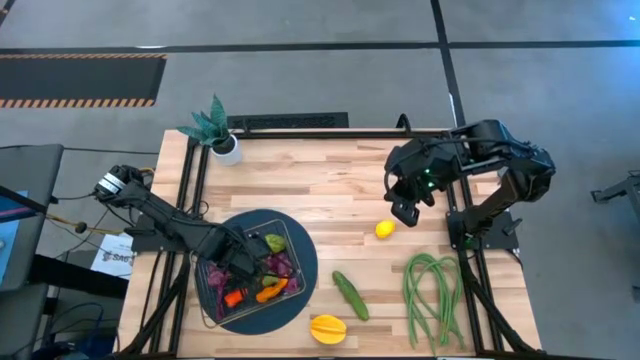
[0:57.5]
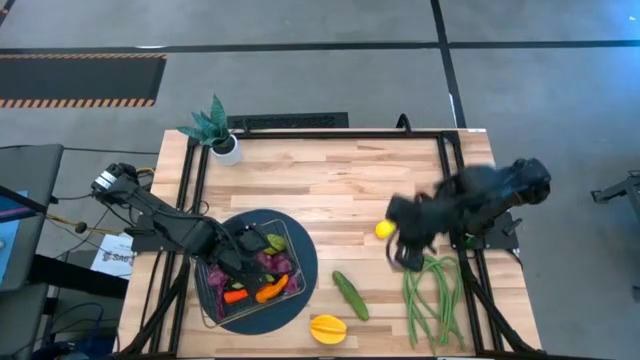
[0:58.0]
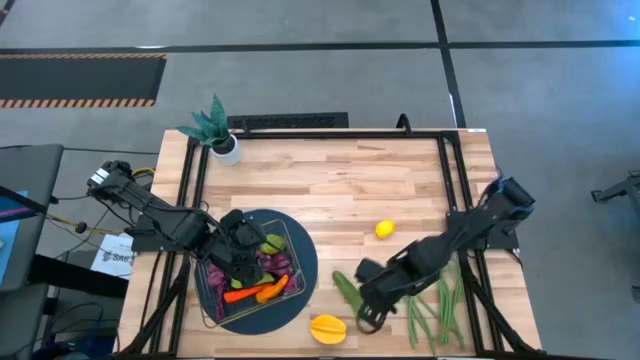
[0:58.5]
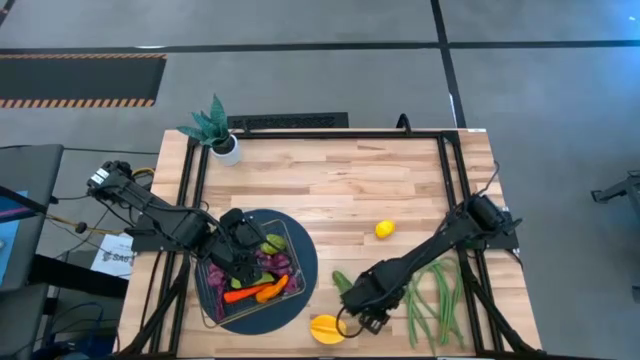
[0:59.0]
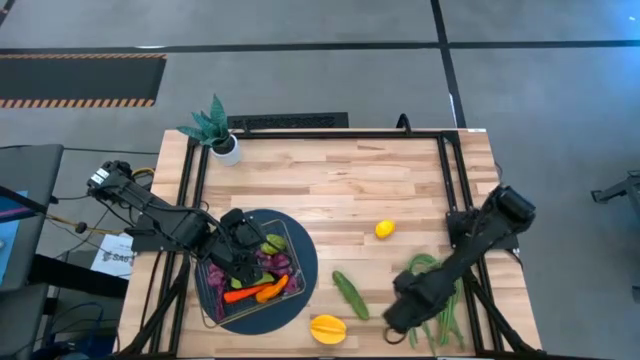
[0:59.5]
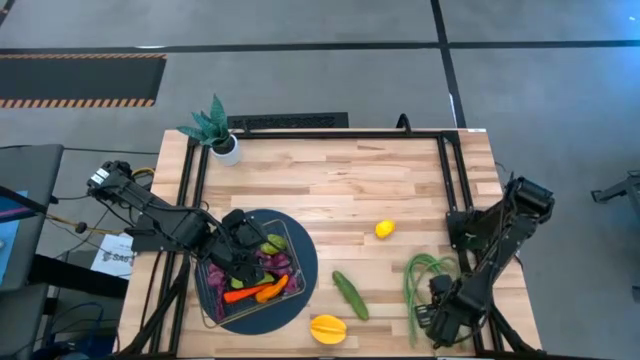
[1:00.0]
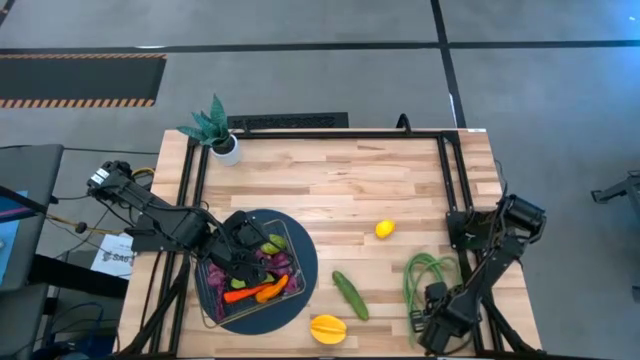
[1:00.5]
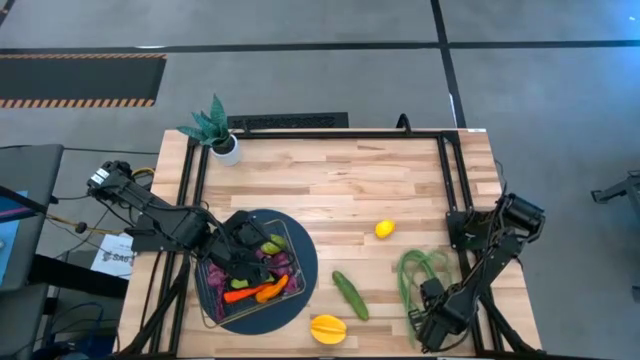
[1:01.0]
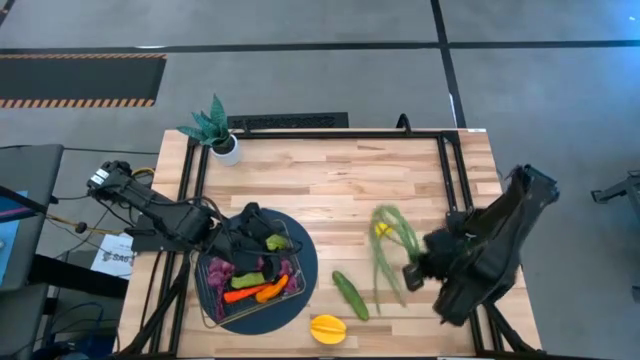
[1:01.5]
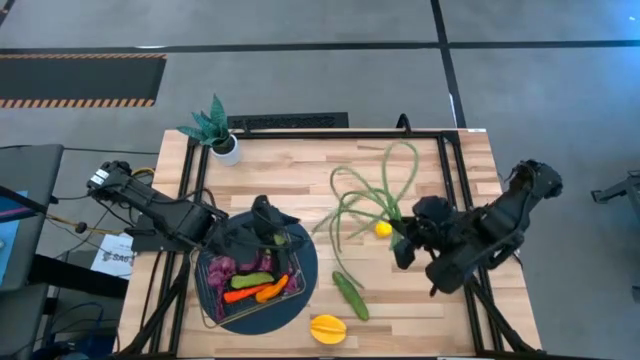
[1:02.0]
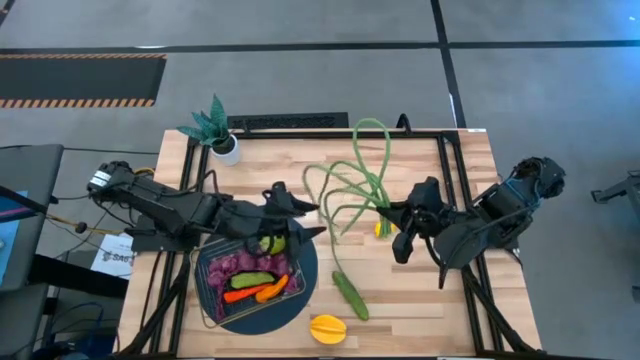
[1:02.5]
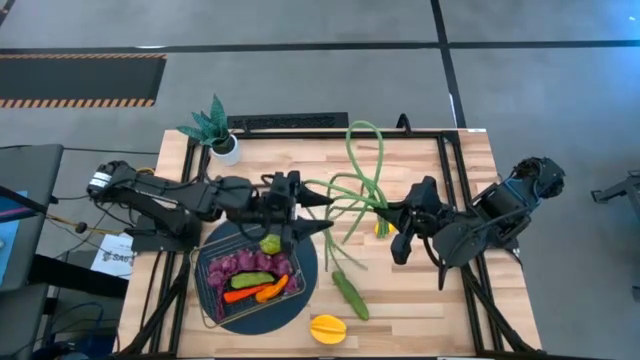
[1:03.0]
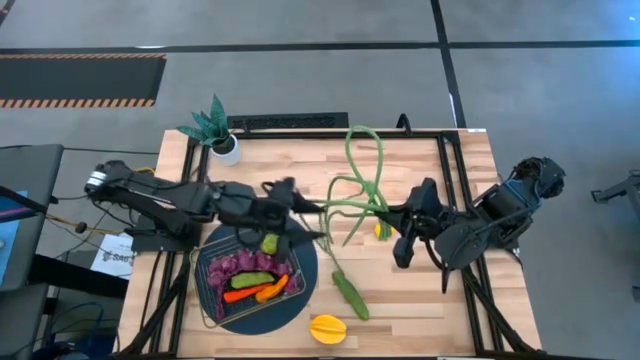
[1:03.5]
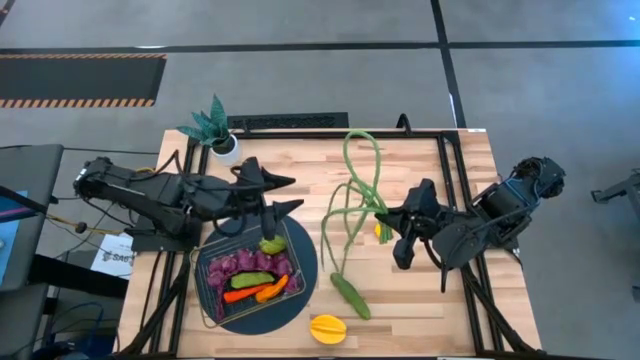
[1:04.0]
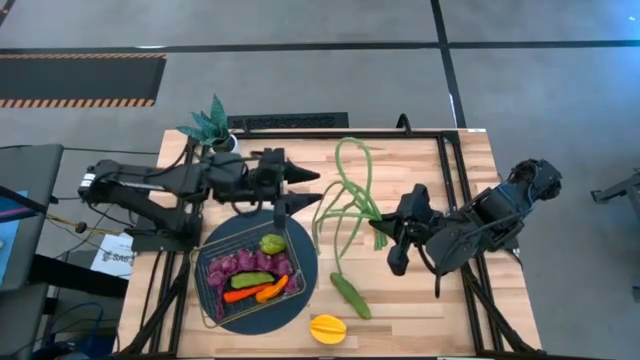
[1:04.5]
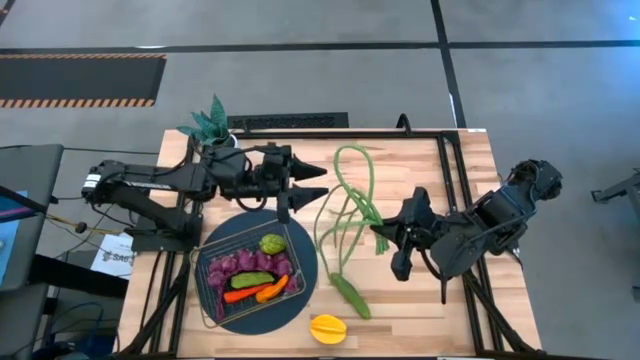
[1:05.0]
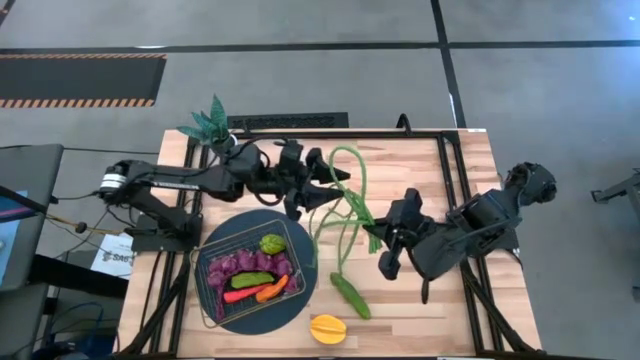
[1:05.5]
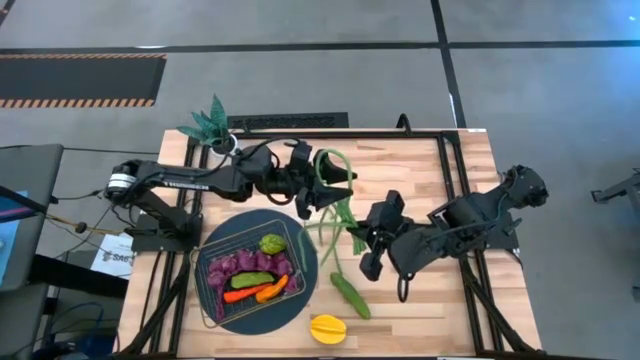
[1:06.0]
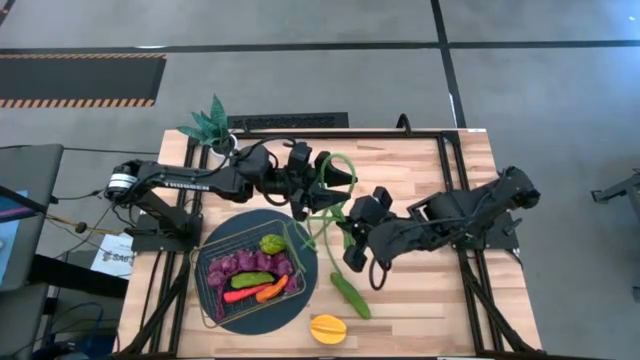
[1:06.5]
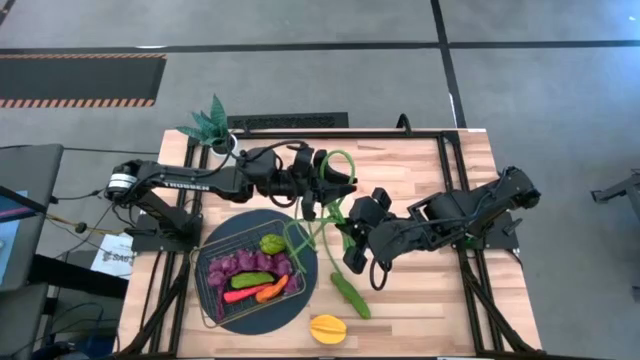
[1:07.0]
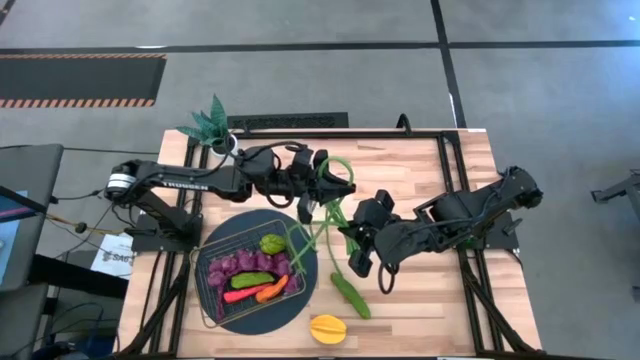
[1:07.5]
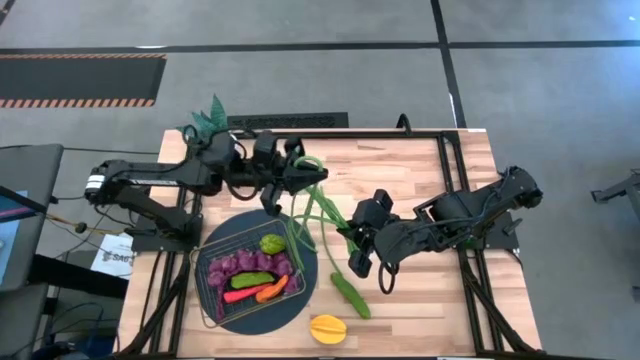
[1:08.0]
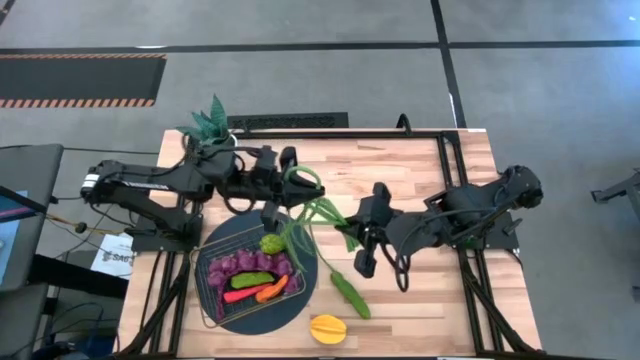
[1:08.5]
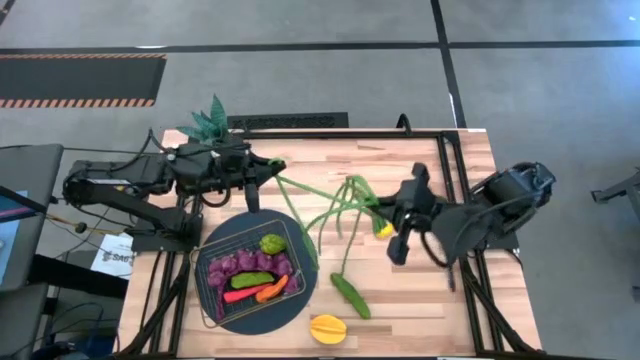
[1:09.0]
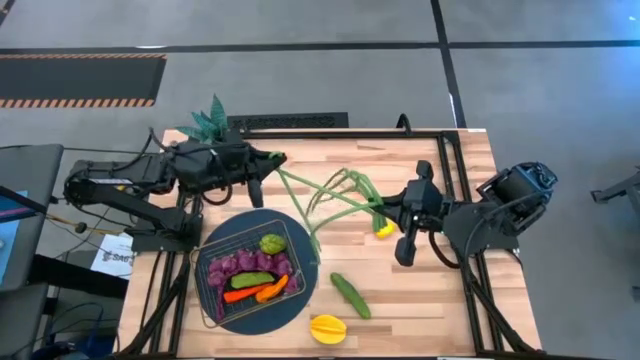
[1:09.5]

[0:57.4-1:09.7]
Task: Build produce basket
Put the bunch of green beans into the wire basket

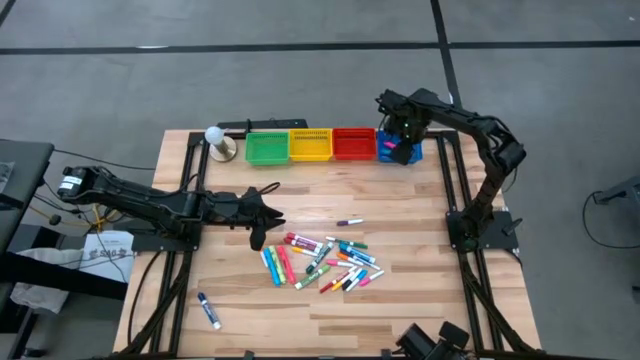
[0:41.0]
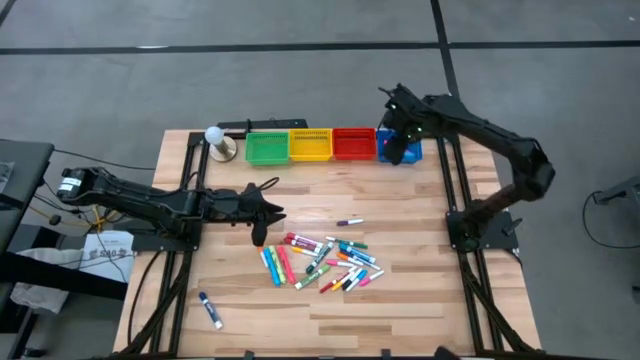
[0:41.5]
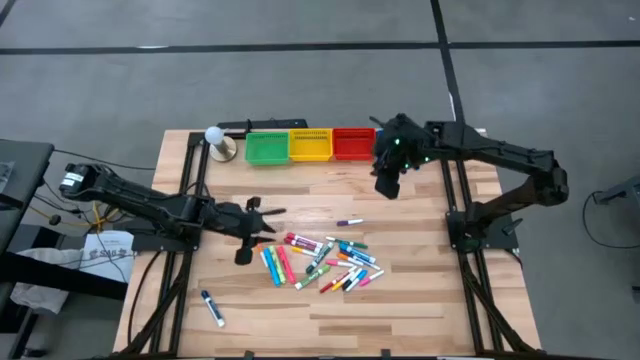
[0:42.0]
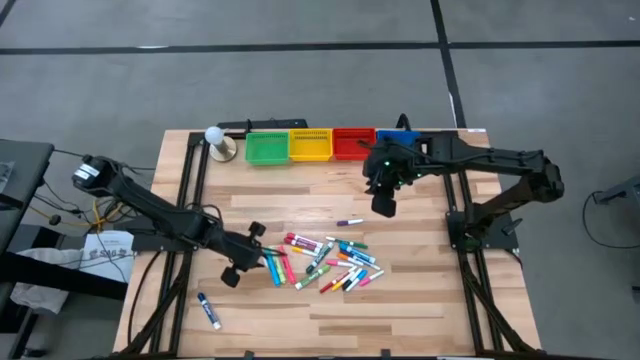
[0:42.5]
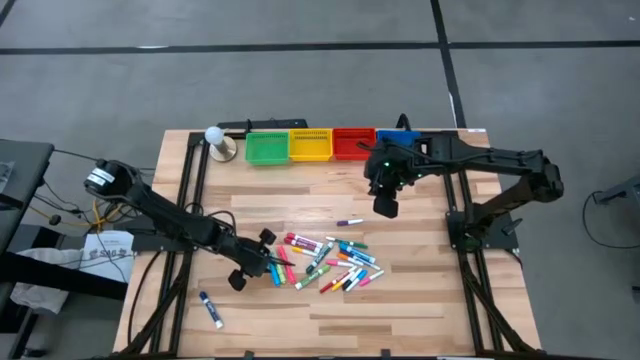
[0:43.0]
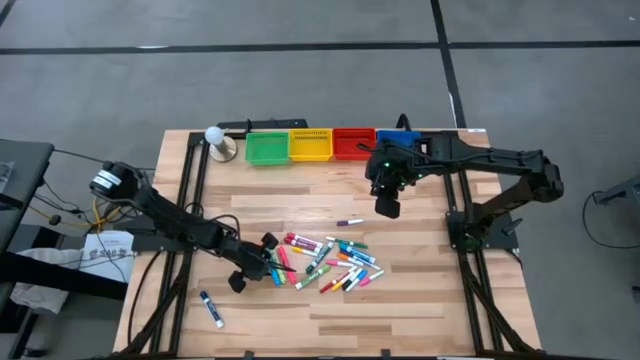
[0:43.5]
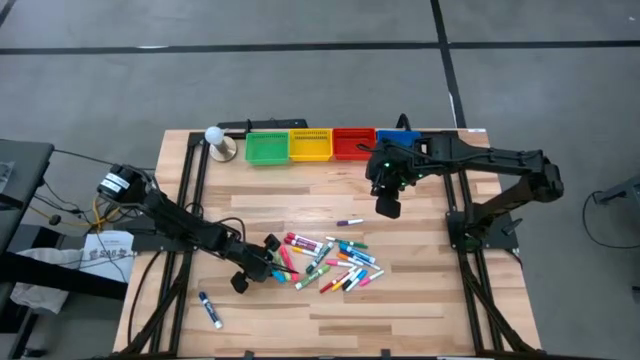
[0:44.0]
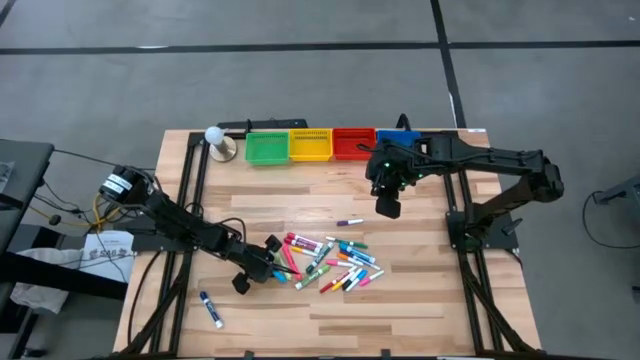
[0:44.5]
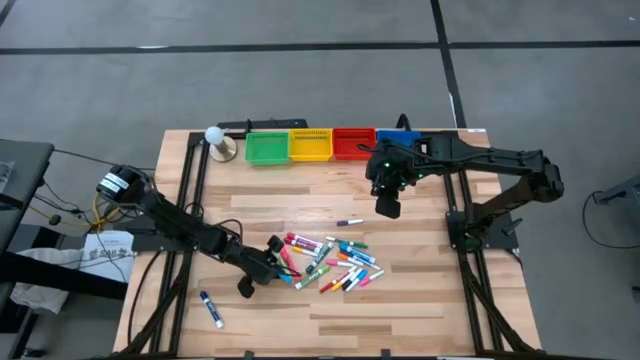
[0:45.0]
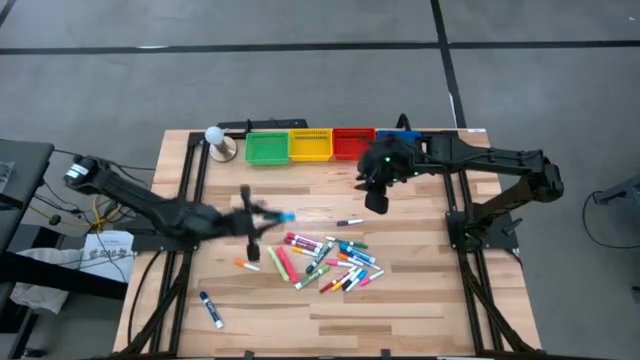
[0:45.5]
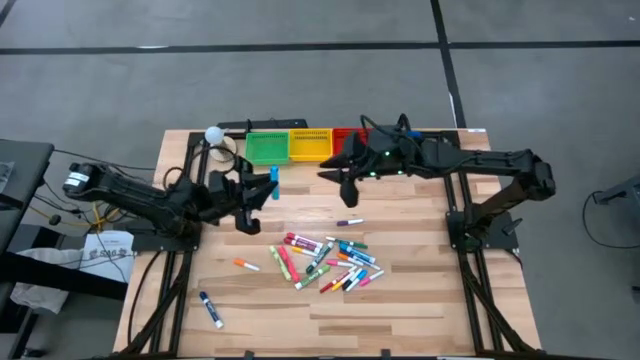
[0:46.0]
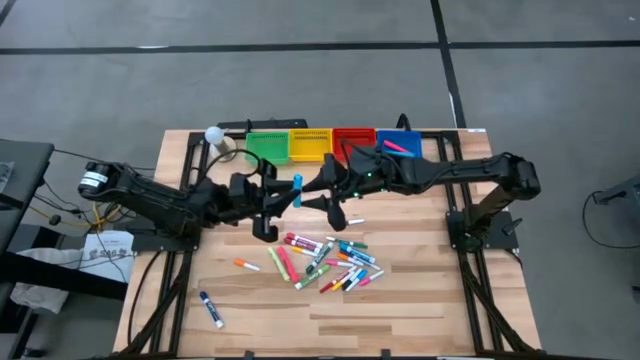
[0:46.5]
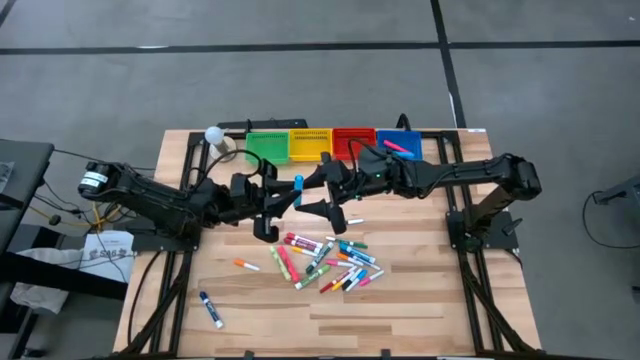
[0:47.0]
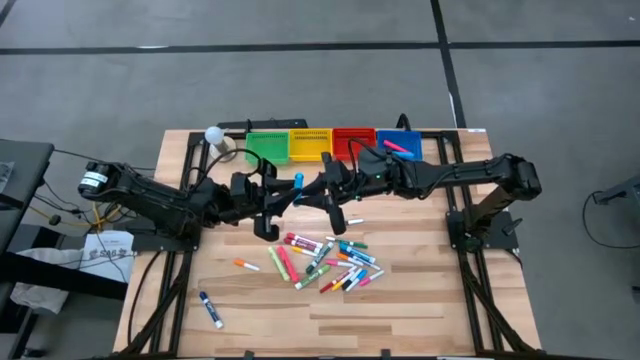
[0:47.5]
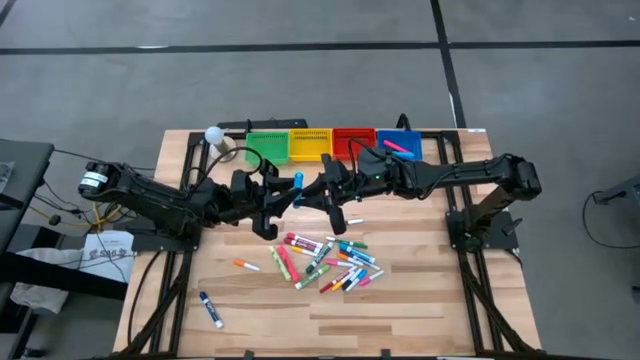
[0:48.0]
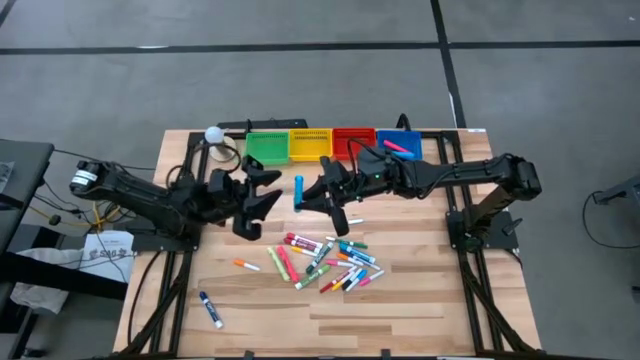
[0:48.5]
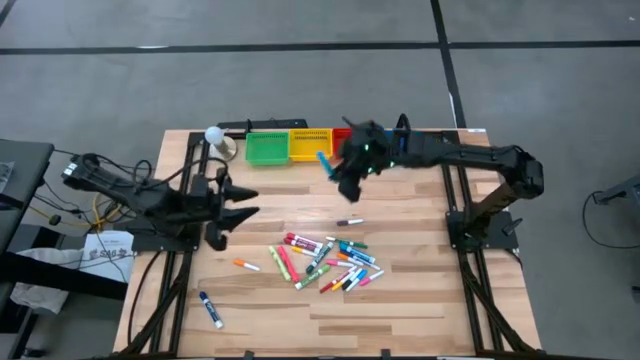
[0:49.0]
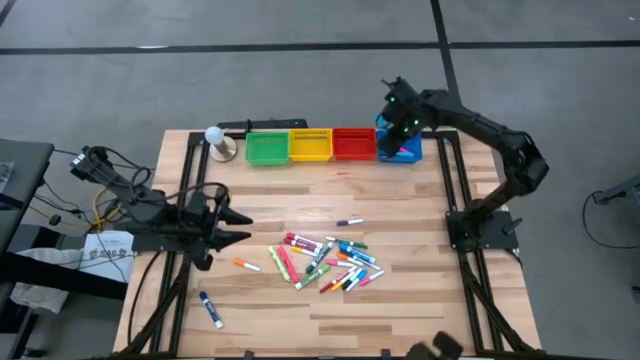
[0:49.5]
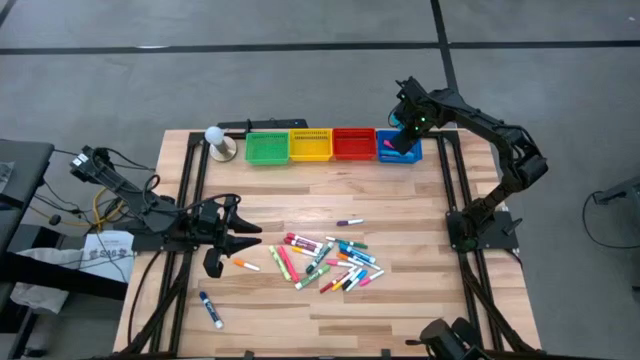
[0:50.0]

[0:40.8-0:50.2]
Task: Pick & Place Markers
Put the blue highlighter pen into the blue basket
